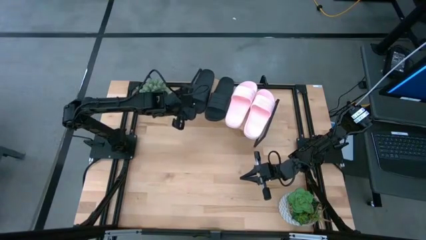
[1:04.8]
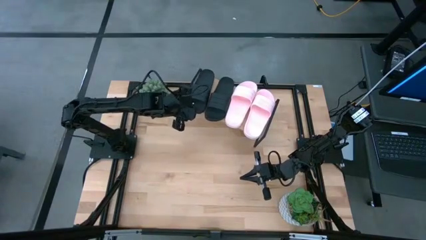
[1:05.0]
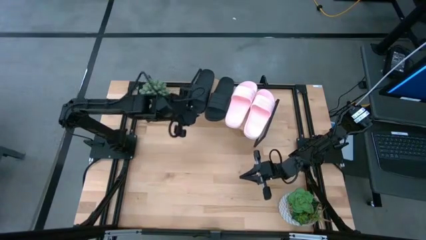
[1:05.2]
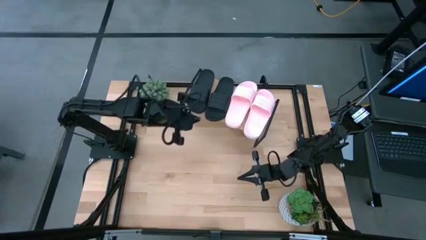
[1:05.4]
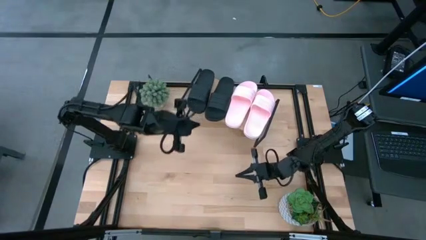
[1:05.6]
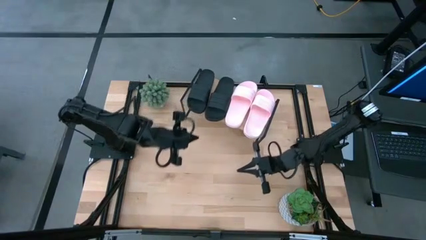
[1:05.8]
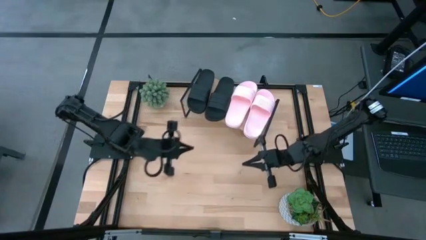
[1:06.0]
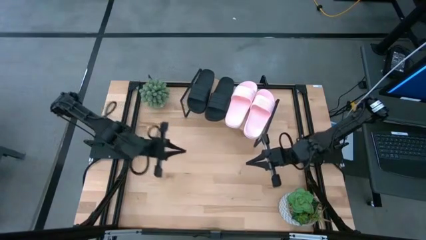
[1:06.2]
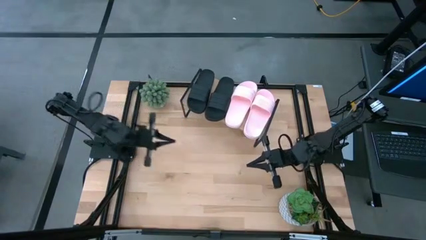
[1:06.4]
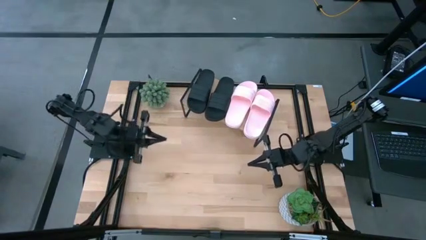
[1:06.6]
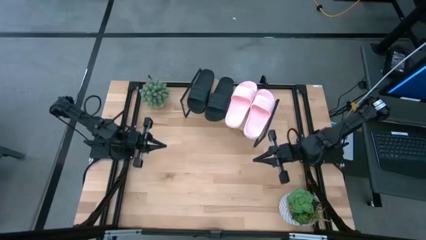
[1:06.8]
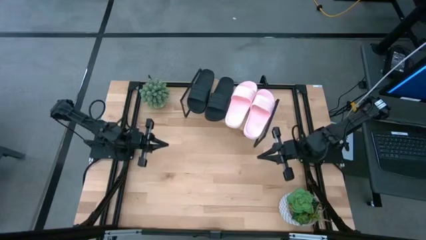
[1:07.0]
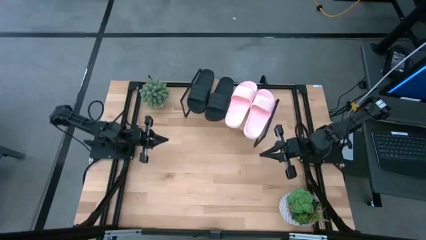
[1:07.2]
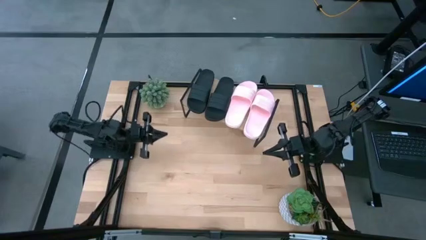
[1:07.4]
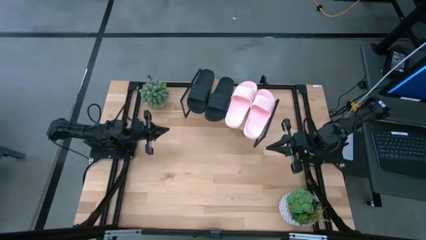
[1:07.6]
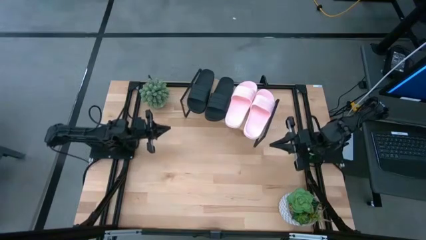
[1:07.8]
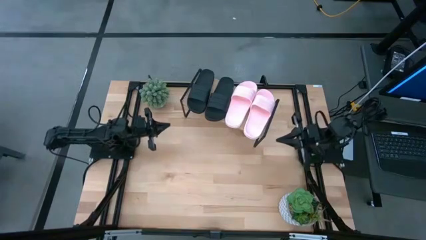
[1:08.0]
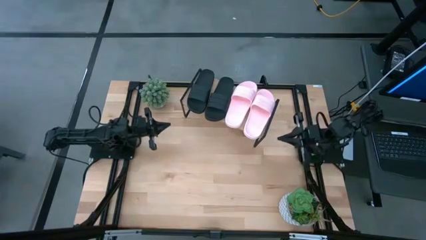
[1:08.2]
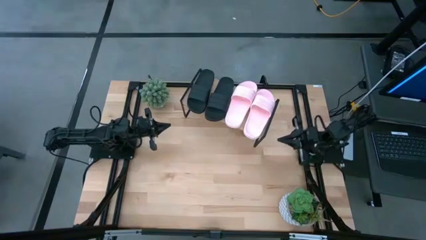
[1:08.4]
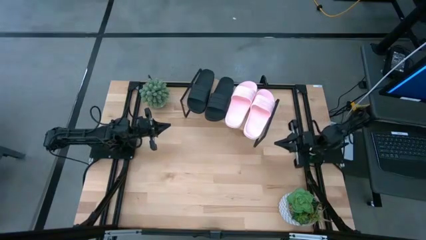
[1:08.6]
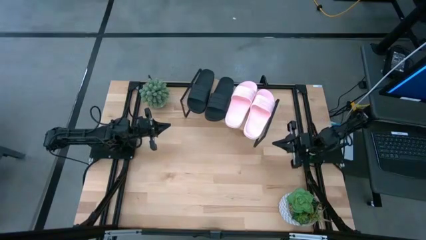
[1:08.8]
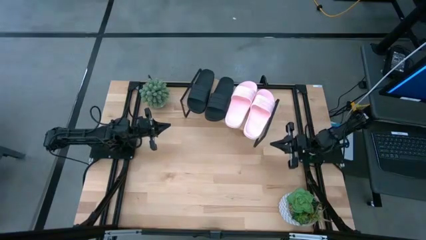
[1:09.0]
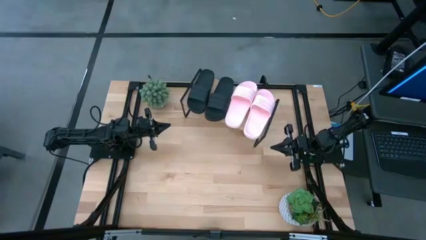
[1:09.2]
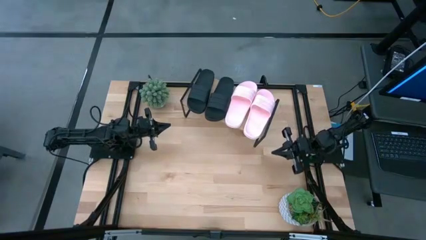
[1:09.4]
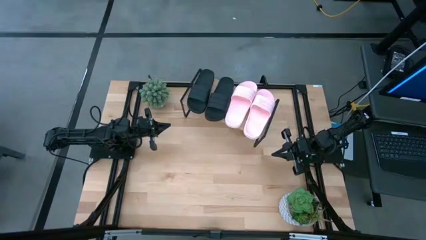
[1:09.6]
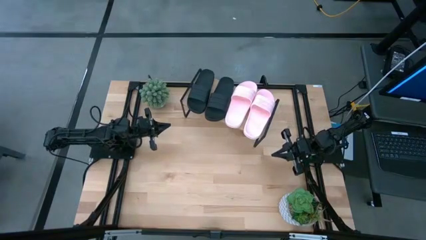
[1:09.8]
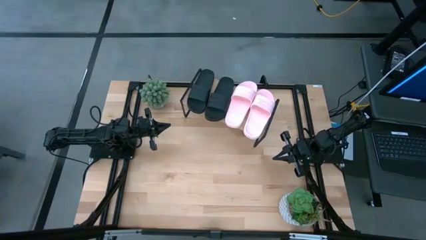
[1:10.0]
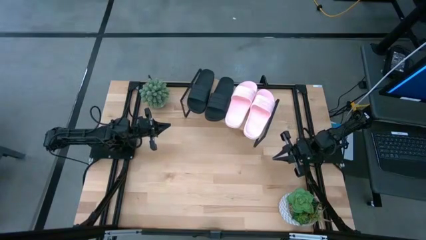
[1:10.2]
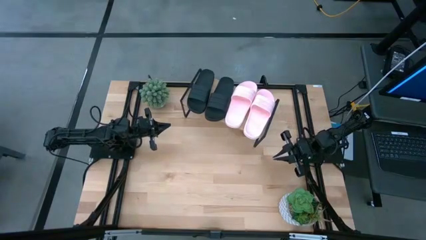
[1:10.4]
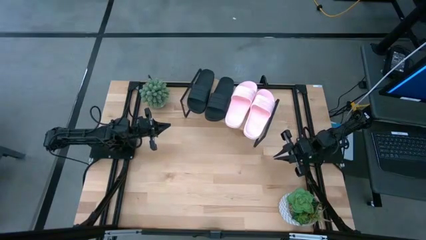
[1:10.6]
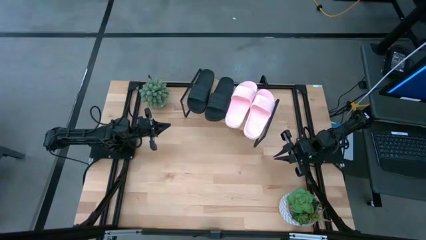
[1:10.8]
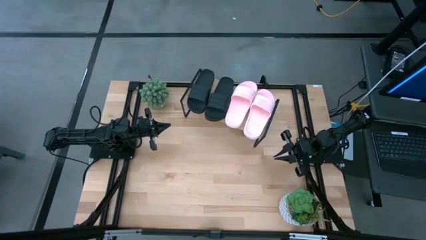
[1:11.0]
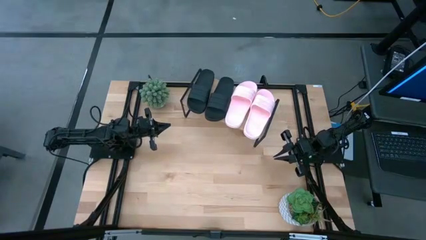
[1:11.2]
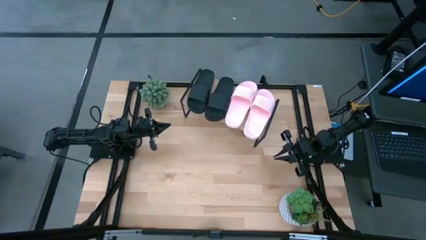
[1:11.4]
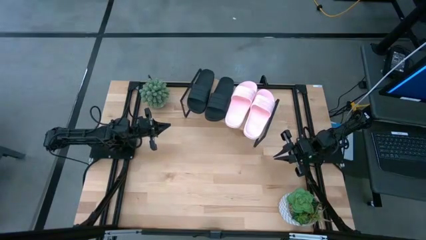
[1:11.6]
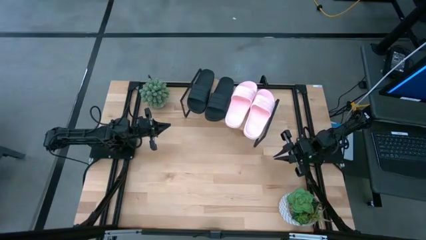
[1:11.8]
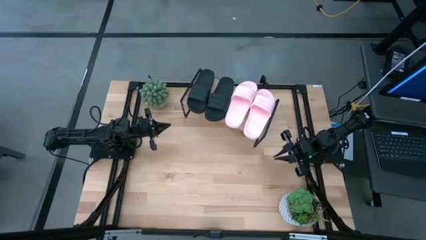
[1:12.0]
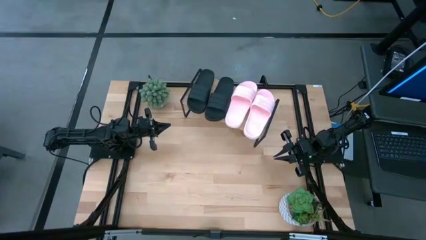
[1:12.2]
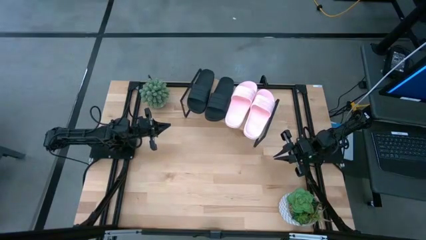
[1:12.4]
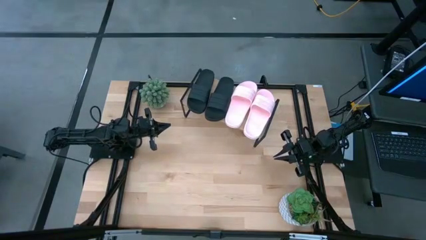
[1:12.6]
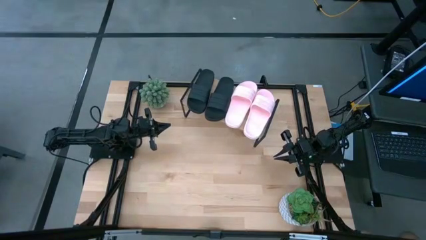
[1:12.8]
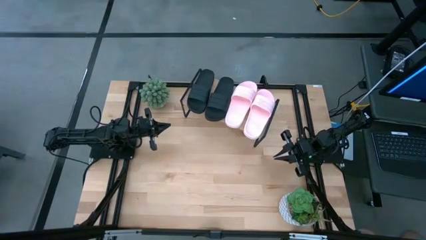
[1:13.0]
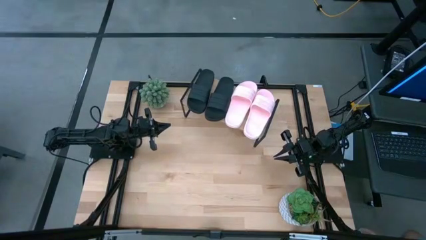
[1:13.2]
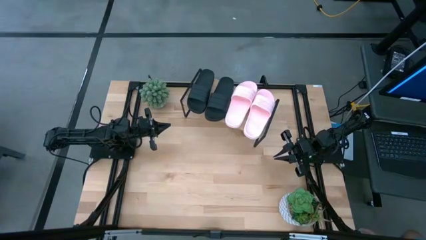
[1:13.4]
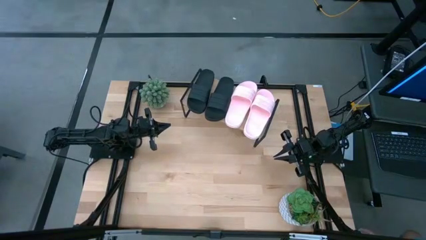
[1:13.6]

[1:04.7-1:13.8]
Task: Pick and place slides into the shelf
Return to Home Position

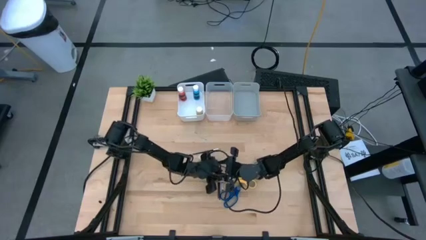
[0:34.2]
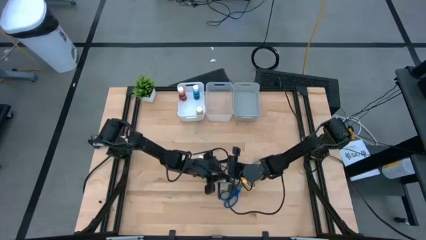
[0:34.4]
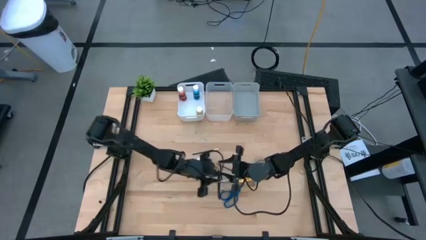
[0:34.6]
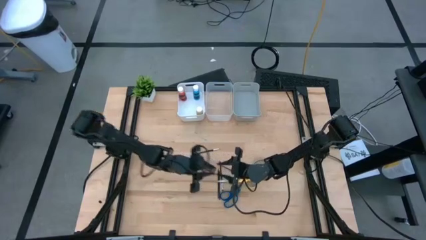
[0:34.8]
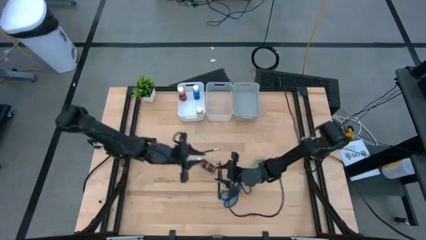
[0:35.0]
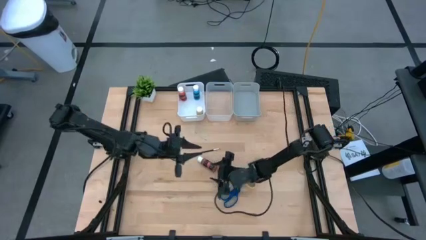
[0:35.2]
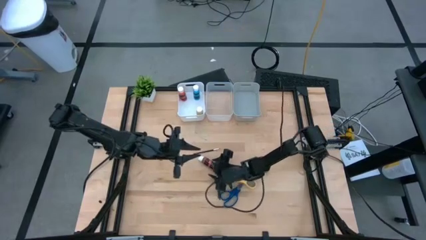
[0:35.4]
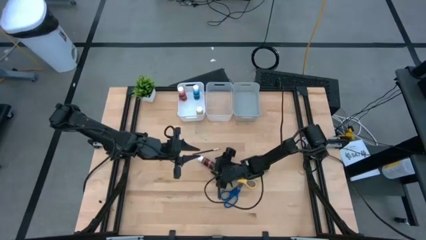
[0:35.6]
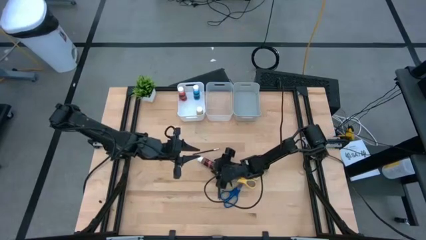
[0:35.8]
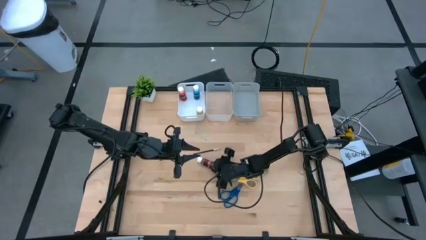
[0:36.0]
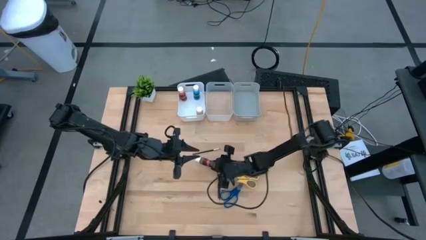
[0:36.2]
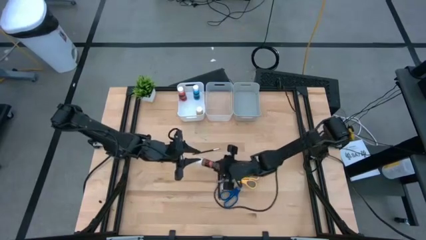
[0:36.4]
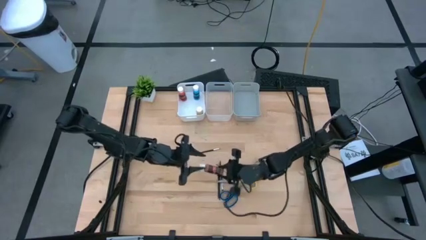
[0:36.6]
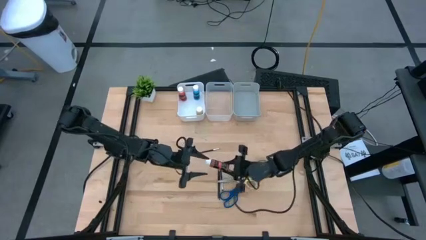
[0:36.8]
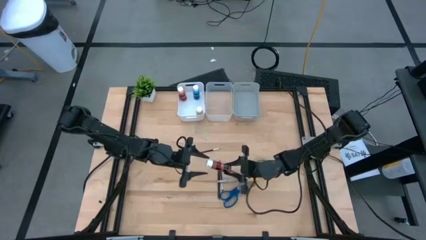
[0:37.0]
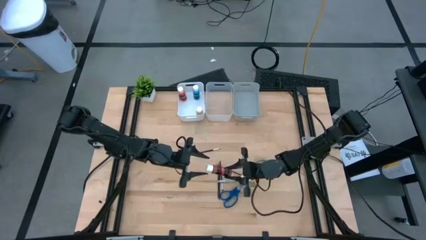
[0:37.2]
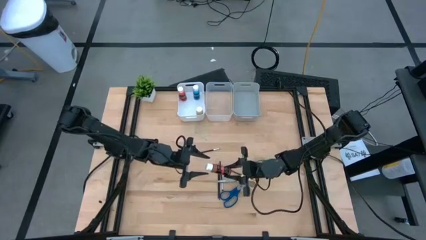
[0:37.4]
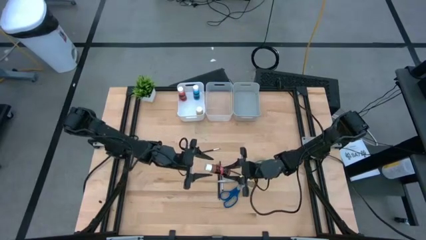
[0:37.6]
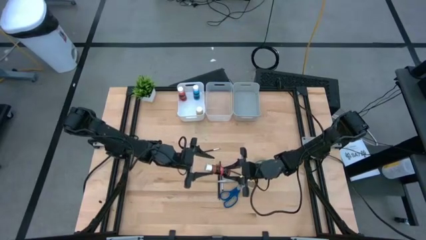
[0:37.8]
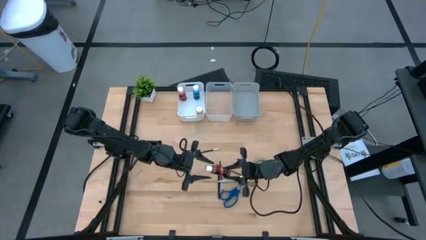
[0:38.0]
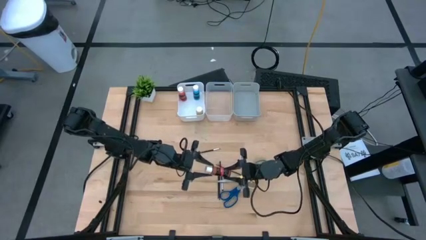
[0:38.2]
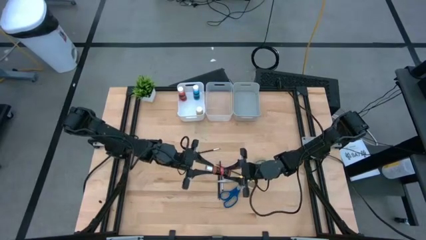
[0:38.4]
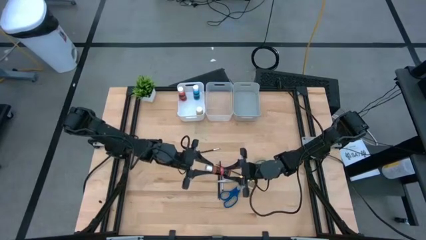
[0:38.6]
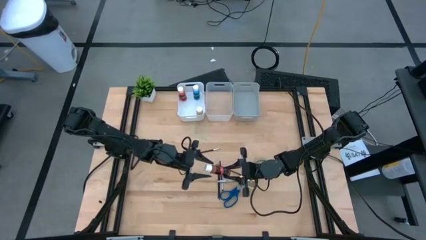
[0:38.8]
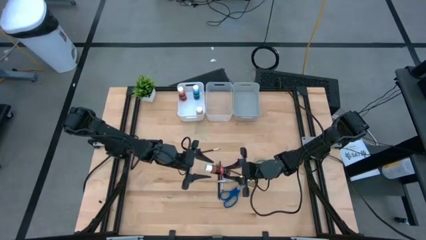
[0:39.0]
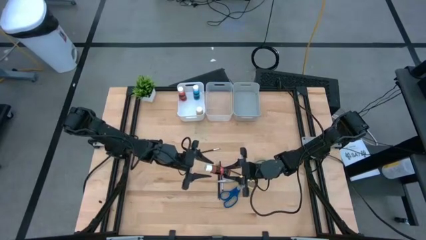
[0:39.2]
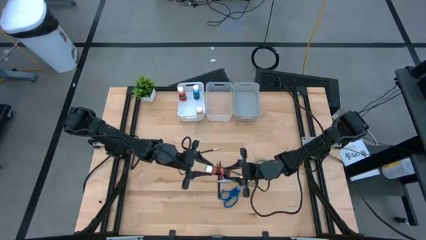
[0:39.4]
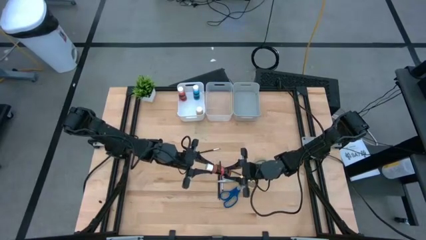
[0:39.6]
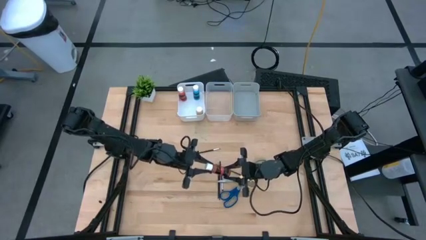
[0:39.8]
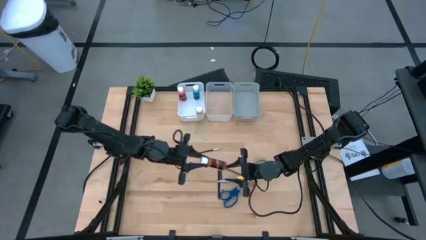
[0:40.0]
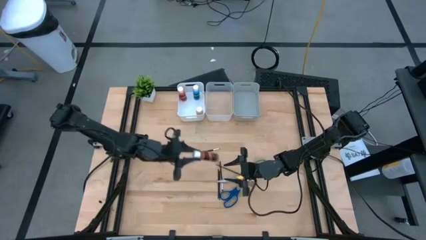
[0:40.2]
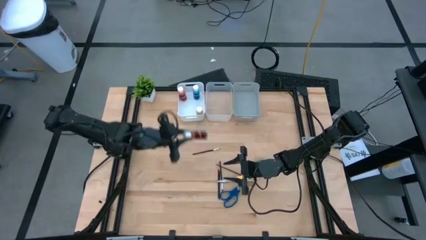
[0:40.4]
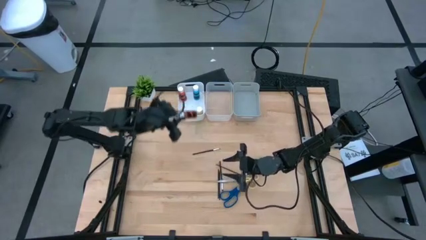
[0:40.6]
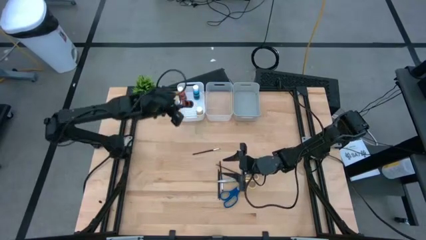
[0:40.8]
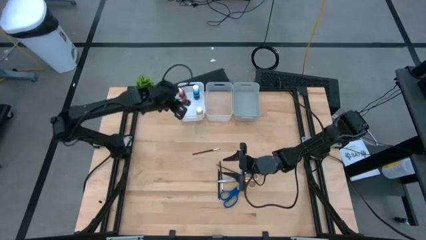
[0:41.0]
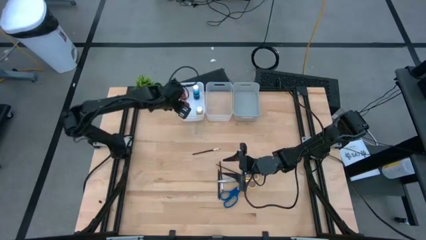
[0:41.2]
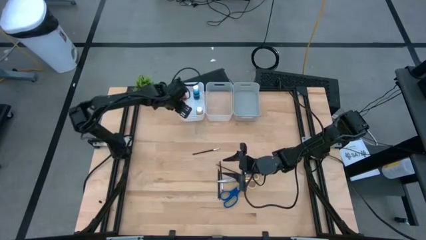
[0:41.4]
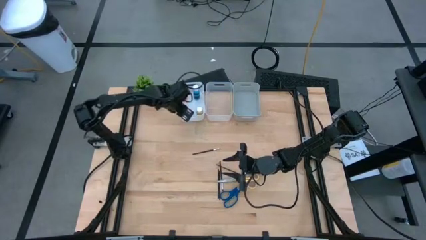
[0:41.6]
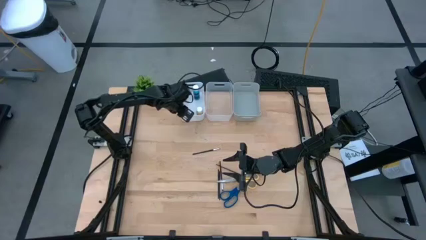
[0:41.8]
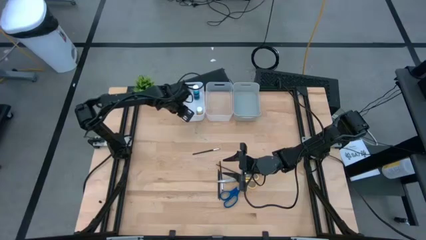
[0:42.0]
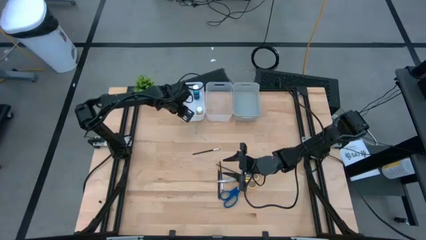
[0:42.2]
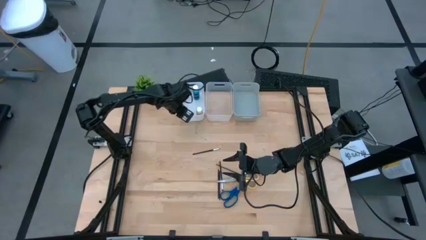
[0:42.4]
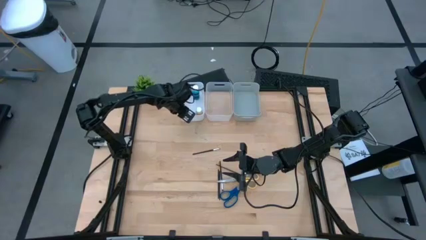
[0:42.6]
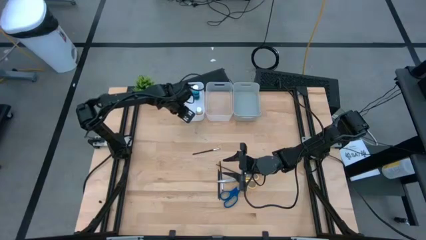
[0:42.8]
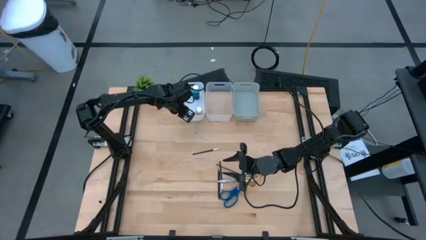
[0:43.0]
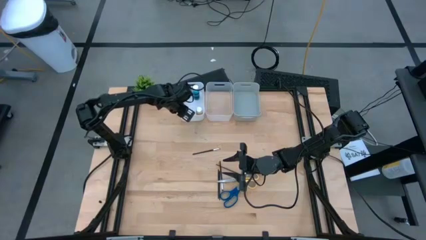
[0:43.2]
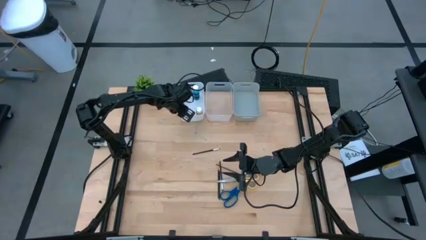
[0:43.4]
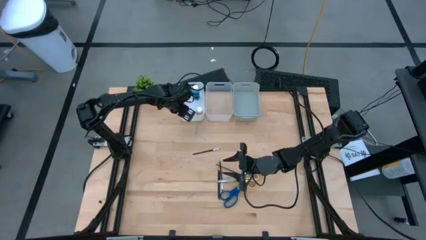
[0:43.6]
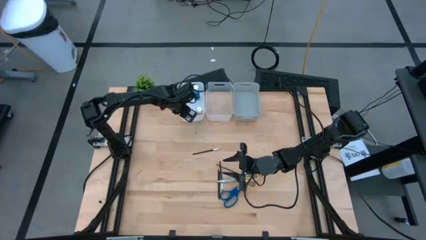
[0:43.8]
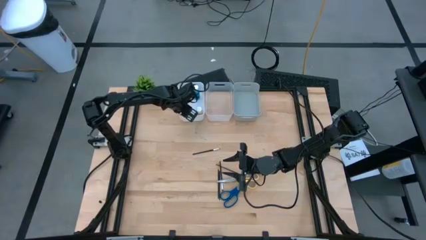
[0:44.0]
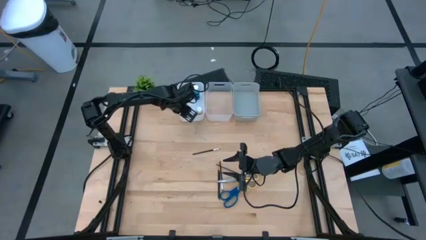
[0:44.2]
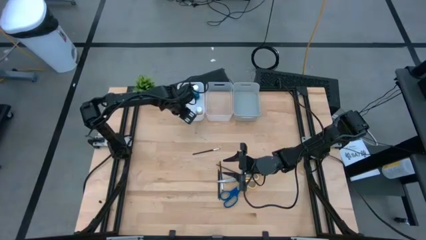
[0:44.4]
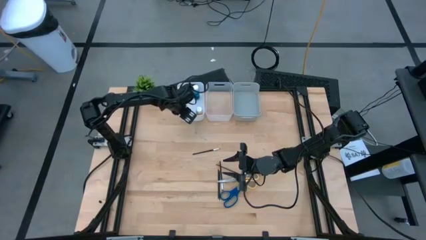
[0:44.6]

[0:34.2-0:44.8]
Task: Pick & Place Paint Supplies
Put the brown paint bottle into the white bin
